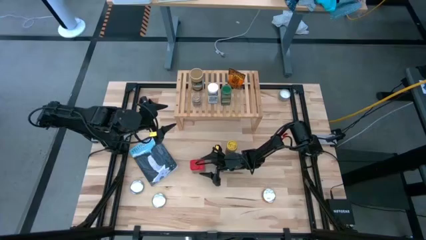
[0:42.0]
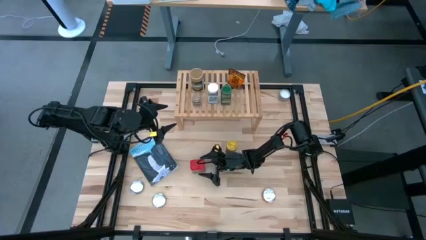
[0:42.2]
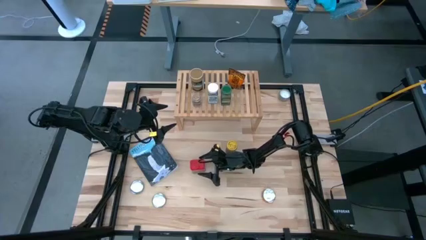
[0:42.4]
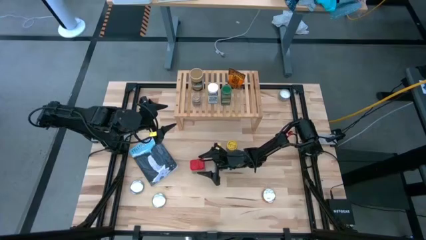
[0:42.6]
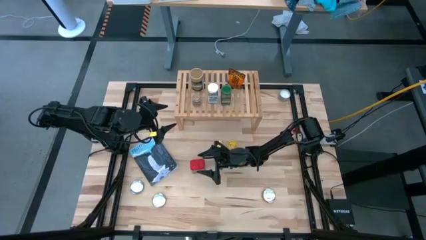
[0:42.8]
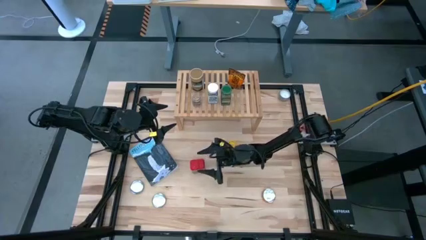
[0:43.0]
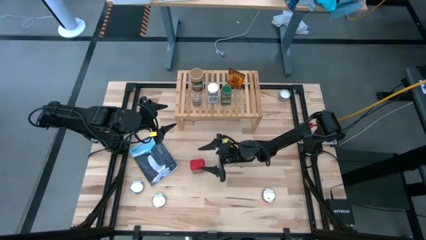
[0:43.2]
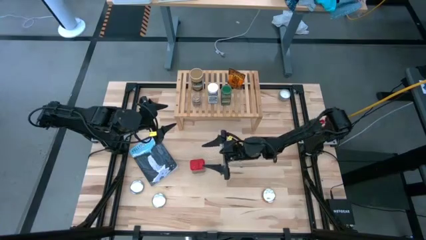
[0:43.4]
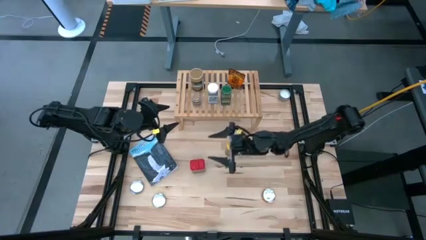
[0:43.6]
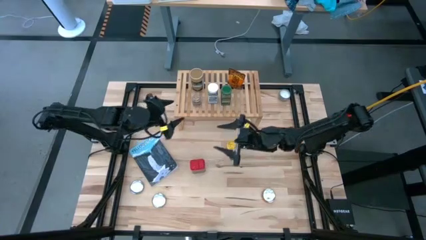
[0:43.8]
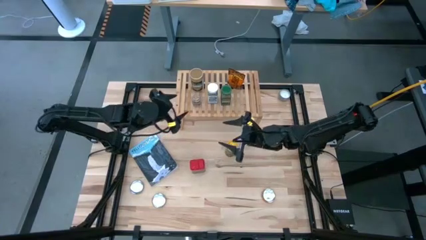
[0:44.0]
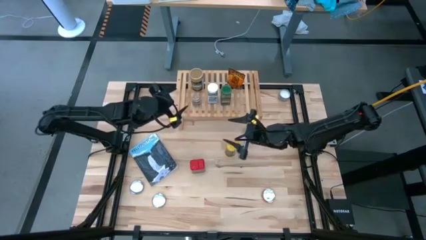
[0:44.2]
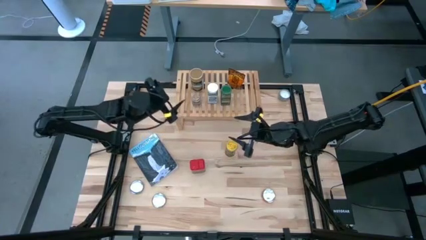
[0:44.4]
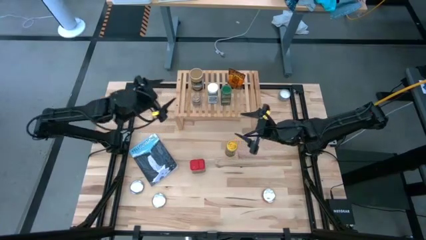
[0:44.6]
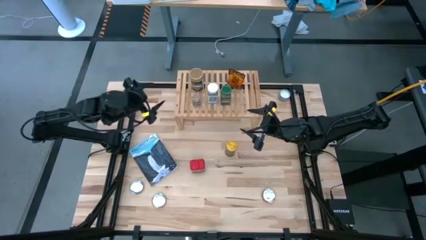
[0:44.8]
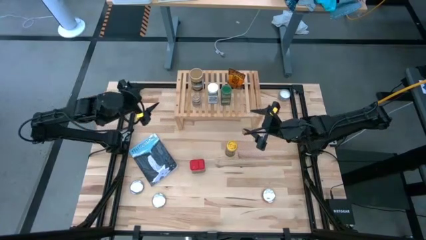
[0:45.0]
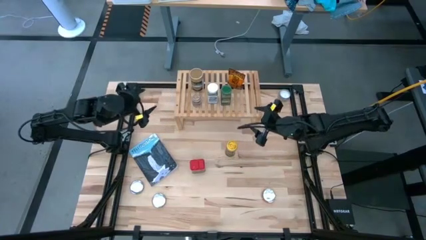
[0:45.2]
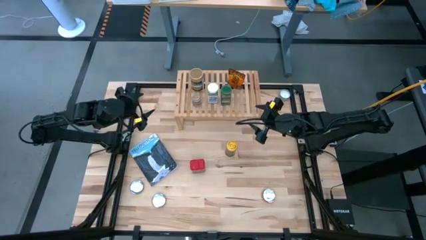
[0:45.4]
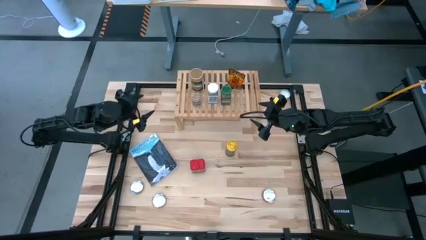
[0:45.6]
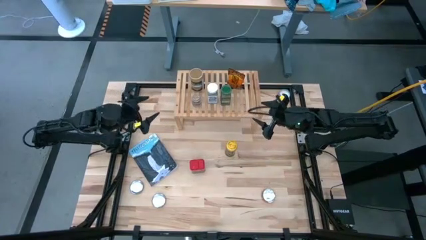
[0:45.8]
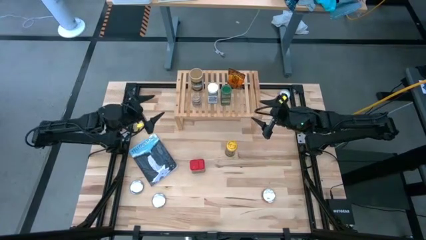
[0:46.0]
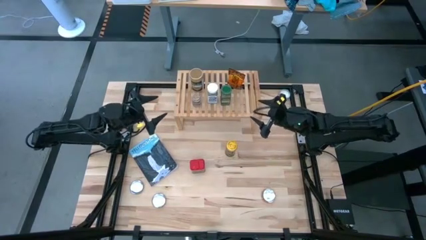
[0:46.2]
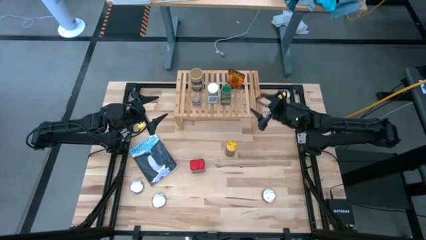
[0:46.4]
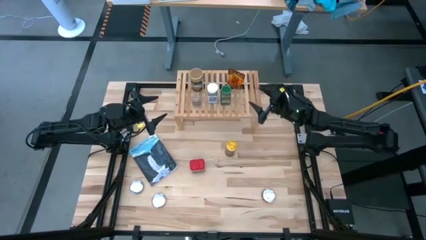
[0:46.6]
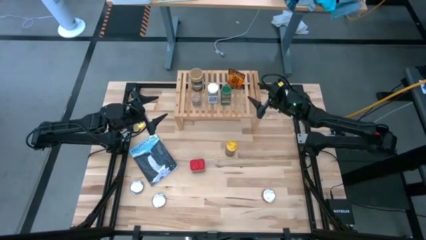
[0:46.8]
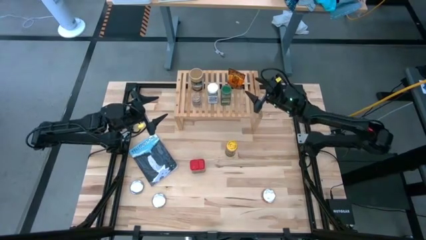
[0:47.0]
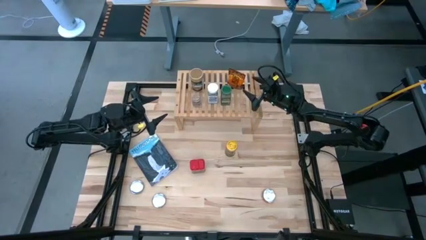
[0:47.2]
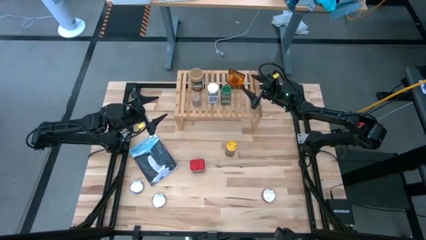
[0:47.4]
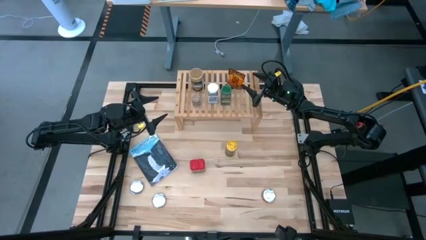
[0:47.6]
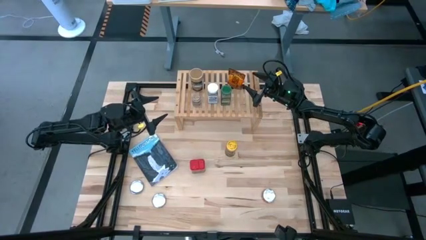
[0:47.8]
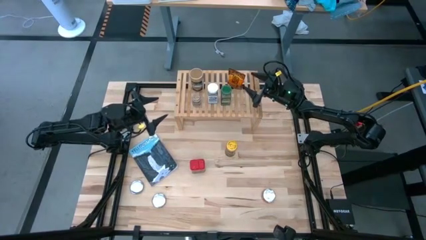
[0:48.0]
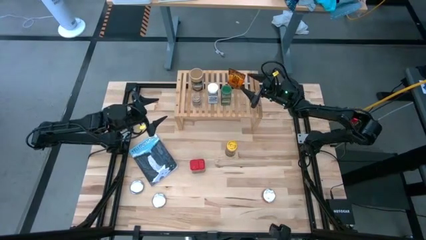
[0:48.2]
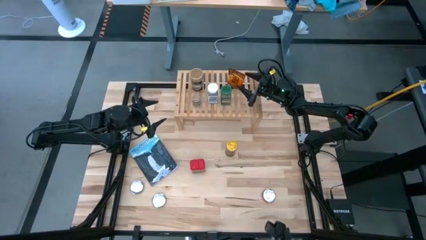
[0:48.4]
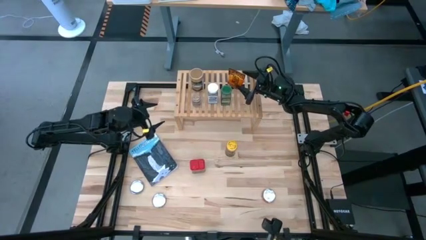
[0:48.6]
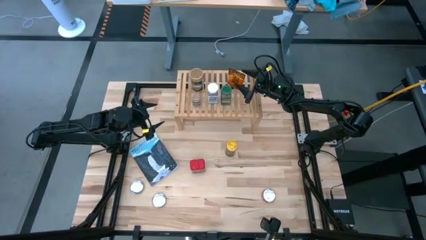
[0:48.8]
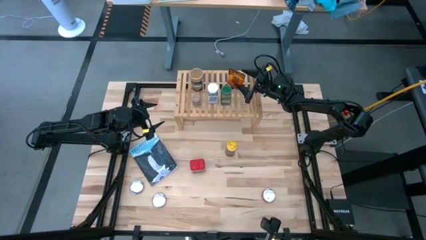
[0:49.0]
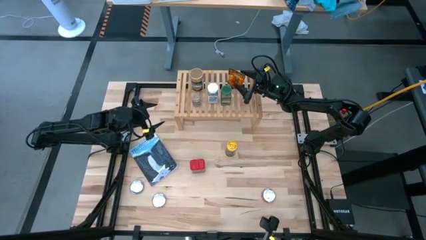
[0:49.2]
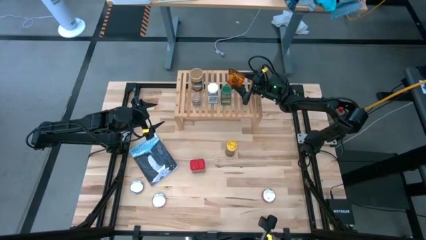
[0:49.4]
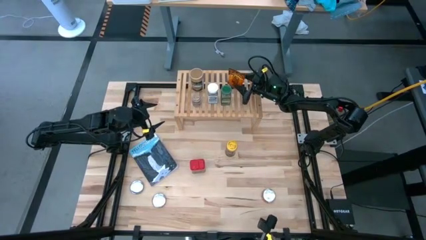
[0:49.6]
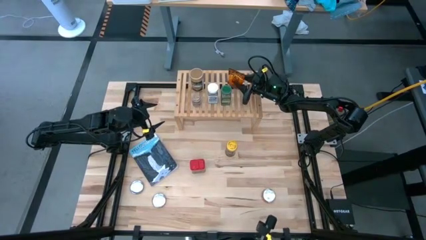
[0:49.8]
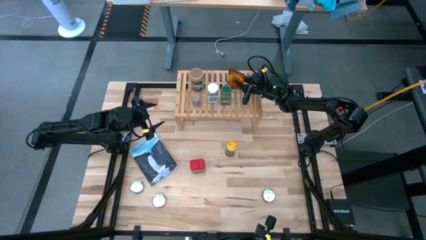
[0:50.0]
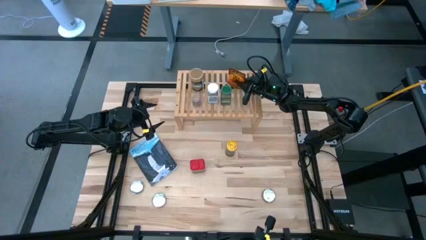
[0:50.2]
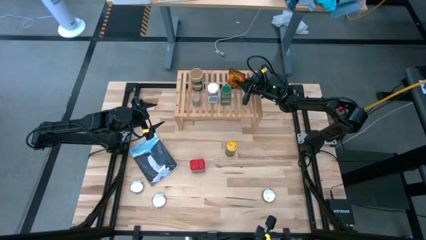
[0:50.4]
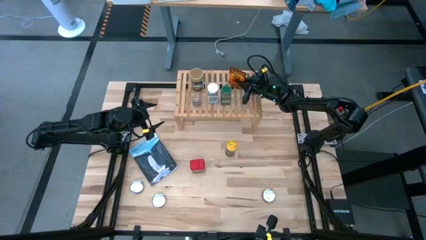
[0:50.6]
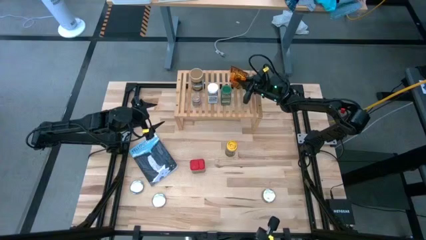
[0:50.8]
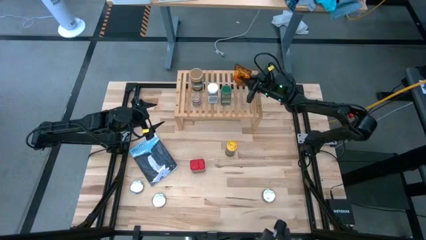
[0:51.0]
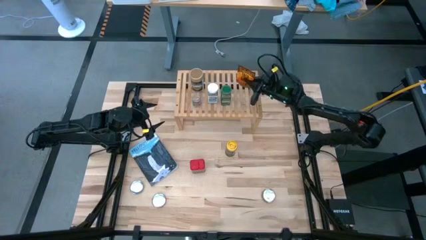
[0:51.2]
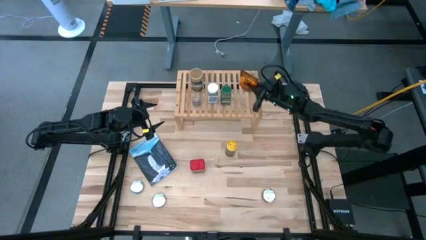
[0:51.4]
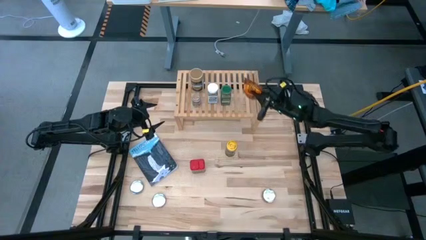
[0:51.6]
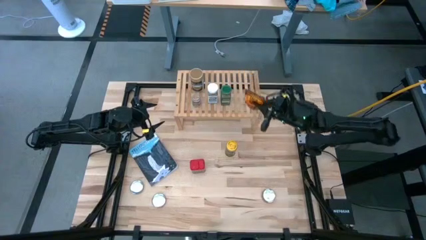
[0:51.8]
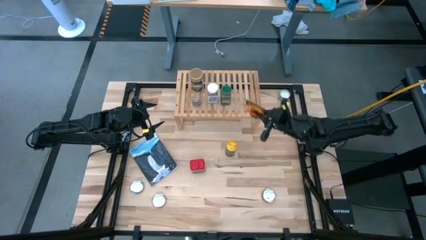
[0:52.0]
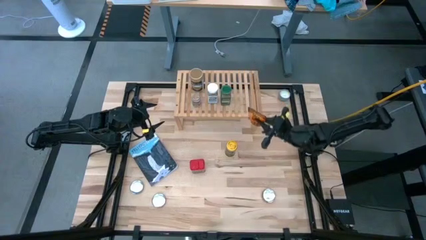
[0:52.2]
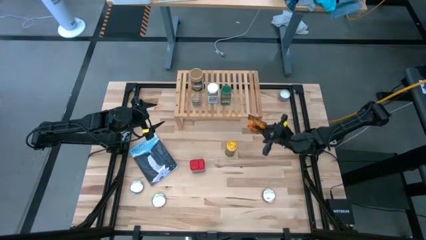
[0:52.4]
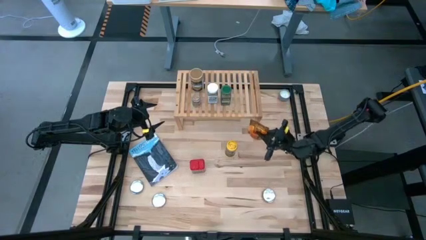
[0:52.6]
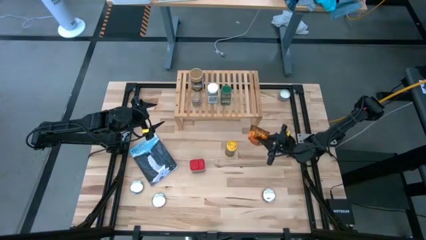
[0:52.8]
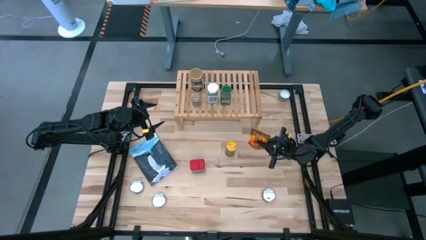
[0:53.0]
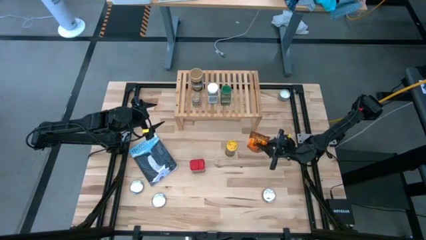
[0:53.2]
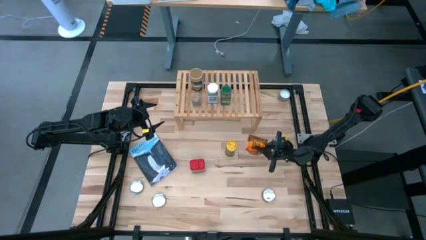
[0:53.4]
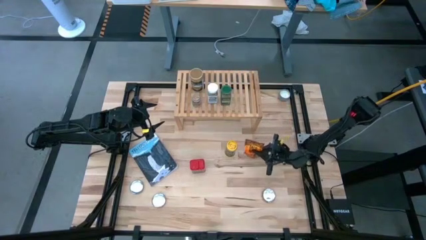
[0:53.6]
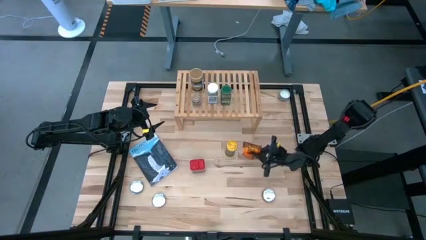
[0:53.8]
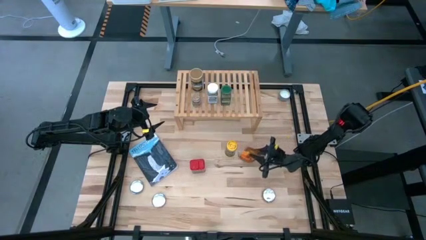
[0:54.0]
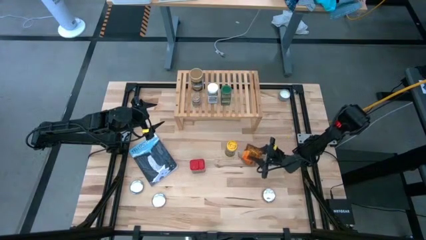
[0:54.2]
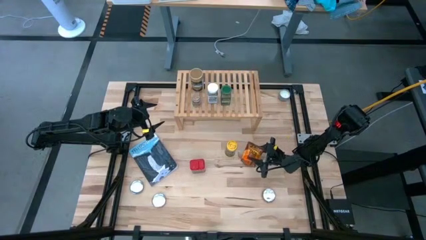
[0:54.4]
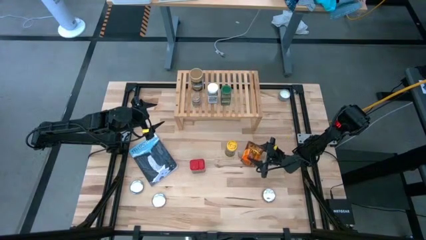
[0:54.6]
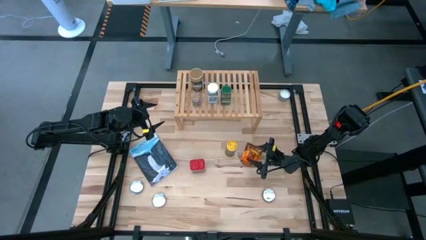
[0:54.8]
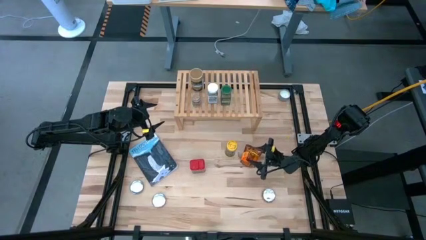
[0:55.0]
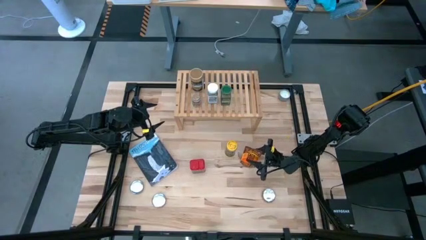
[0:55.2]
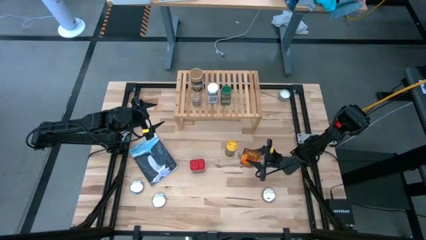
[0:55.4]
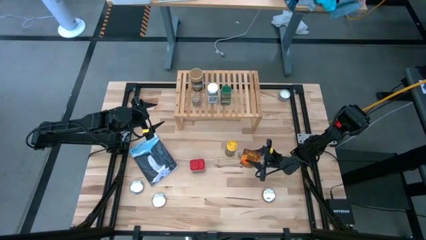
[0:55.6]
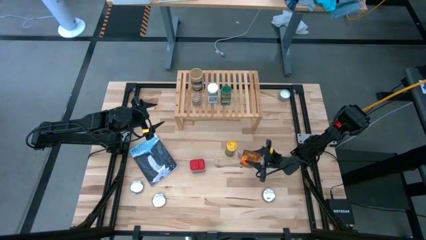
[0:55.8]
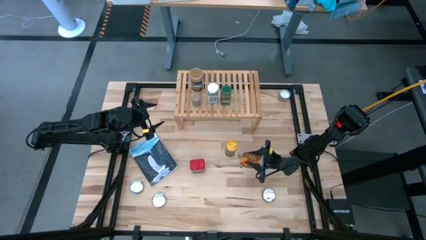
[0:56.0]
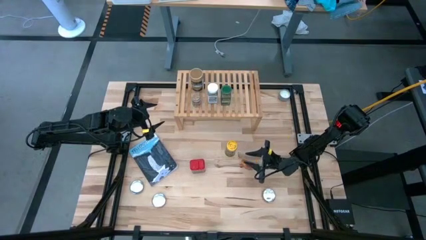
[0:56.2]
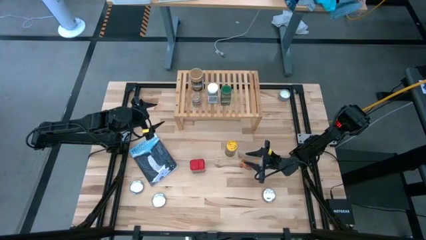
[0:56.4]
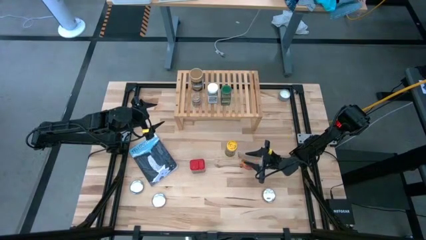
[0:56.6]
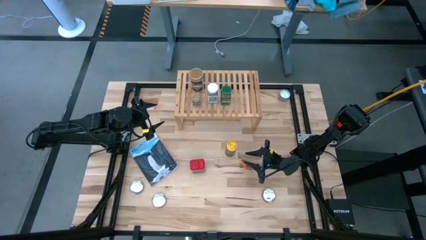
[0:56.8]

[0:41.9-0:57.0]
Task: Shelf spices
Remove the brown seasoning bag from the shelf

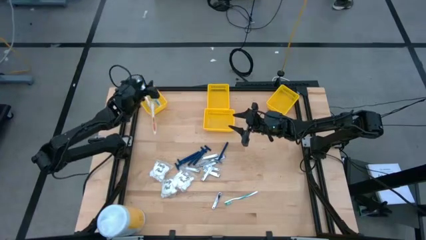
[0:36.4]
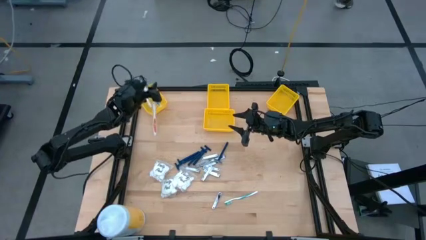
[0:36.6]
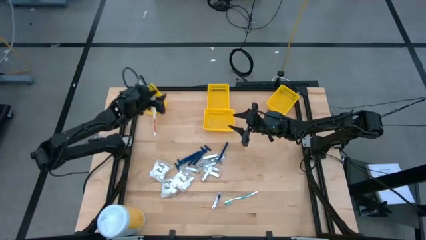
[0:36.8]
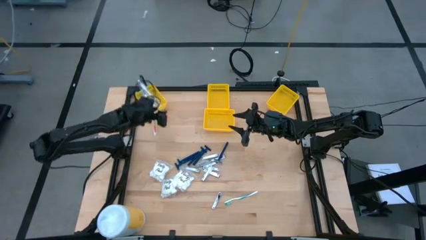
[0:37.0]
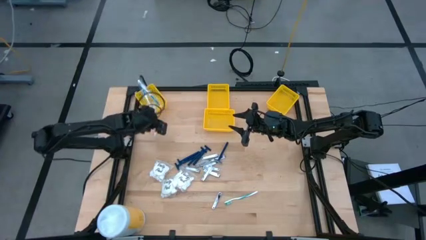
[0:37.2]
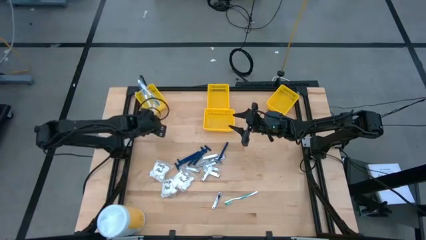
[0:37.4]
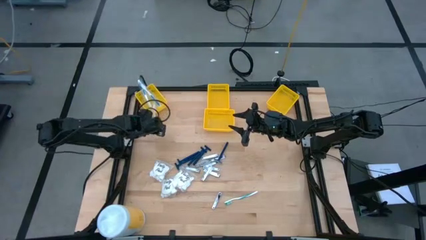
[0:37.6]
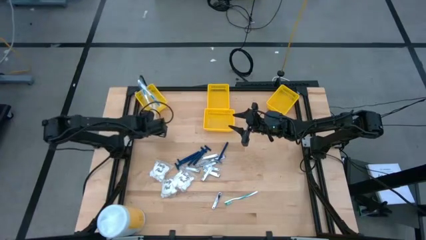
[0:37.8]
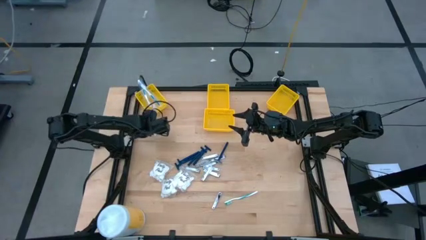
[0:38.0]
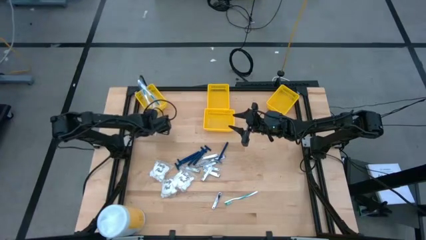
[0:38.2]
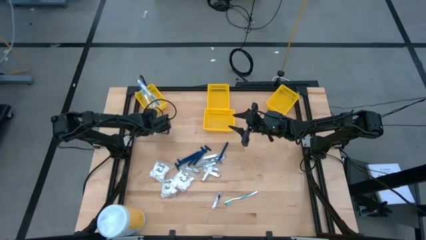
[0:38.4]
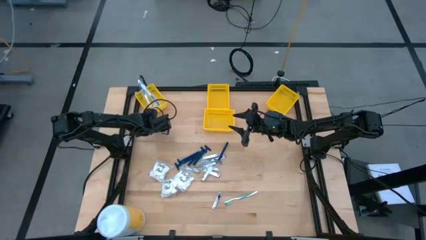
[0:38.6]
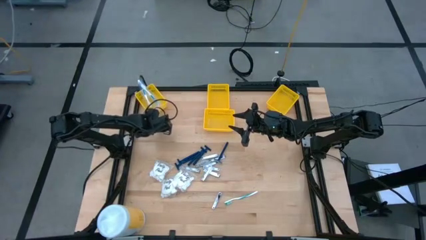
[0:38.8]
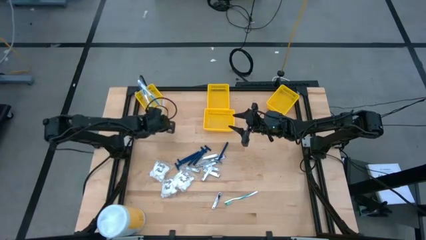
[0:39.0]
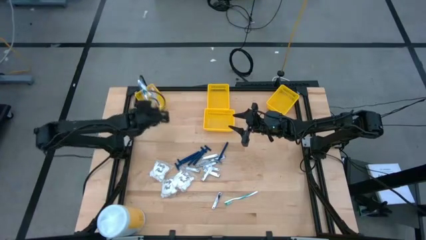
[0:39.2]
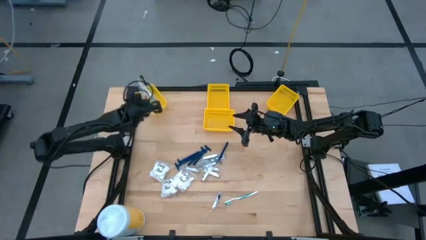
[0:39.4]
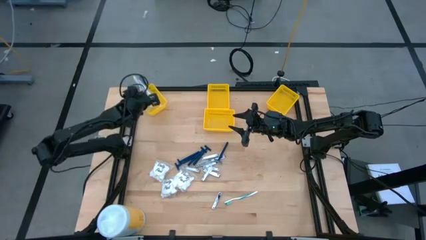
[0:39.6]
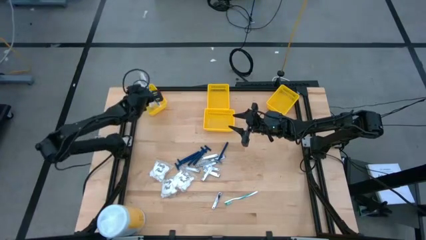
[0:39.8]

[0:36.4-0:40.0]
Task: Pick & Place Travel size toiletries
Put the orange toothbrush into the left yellow bin
